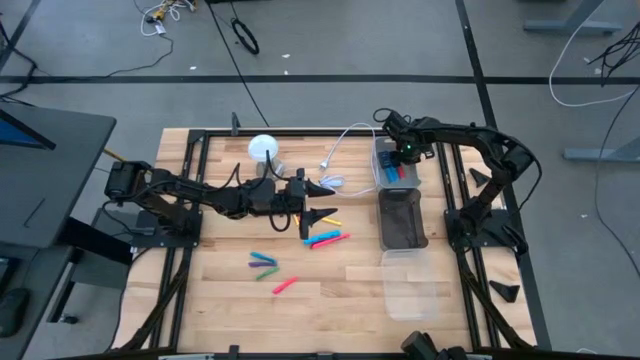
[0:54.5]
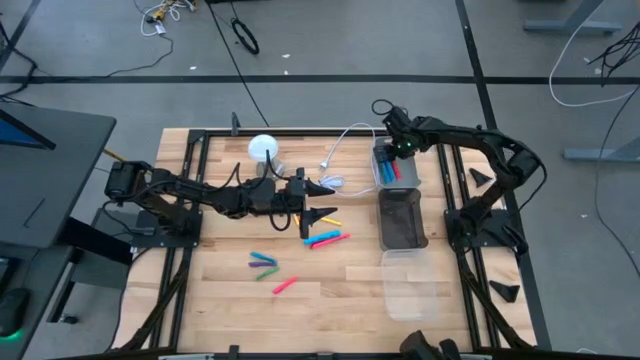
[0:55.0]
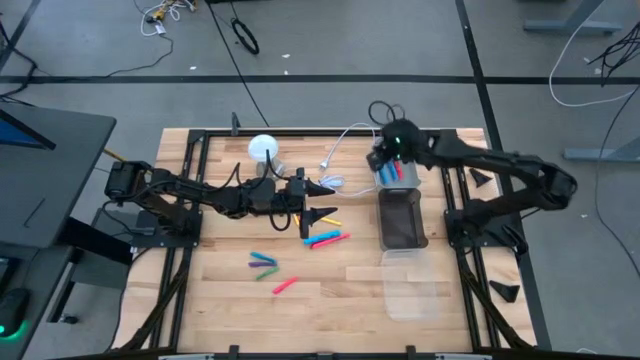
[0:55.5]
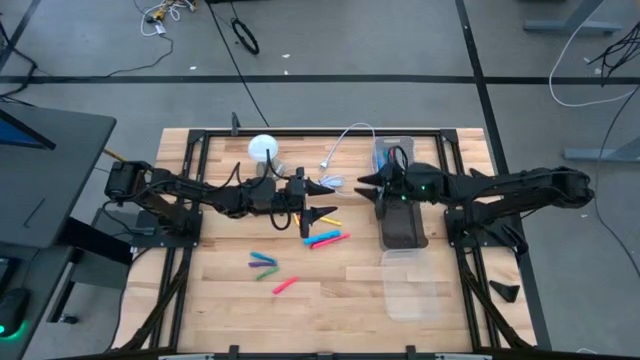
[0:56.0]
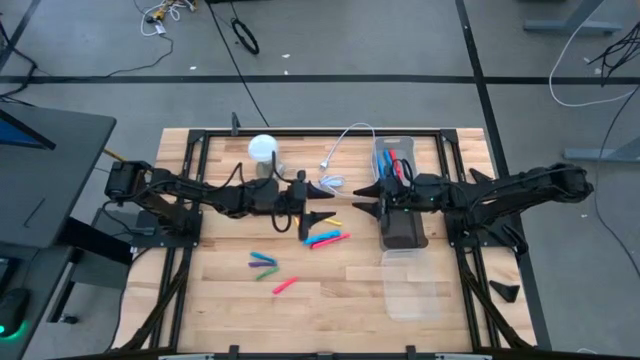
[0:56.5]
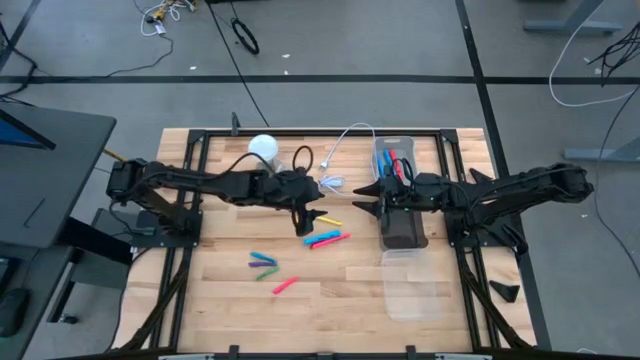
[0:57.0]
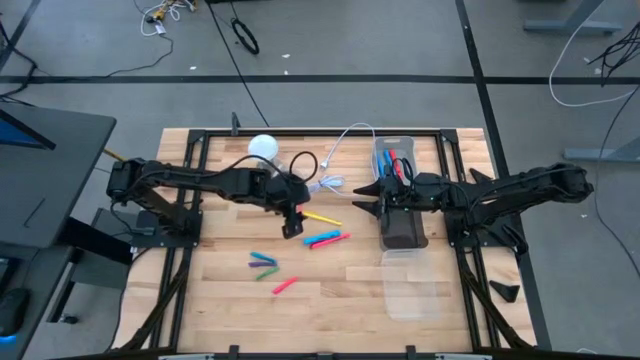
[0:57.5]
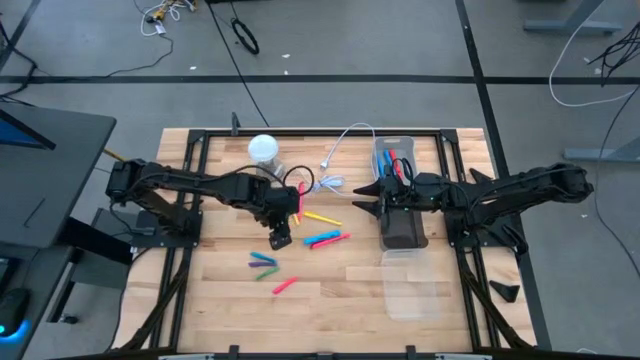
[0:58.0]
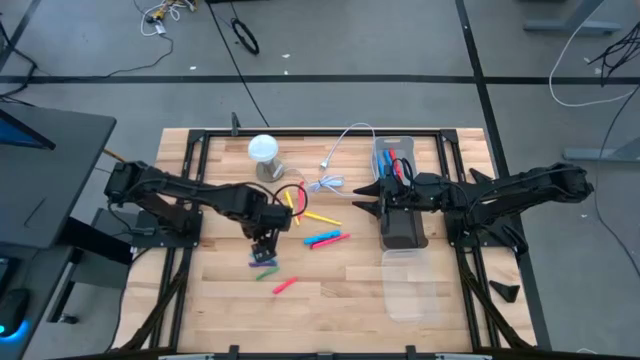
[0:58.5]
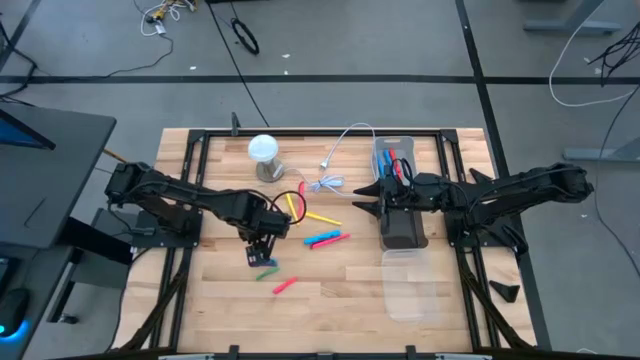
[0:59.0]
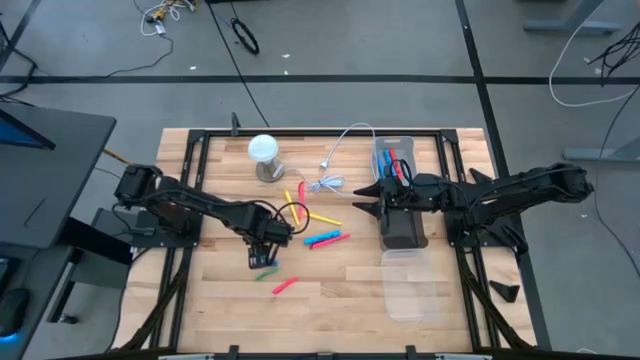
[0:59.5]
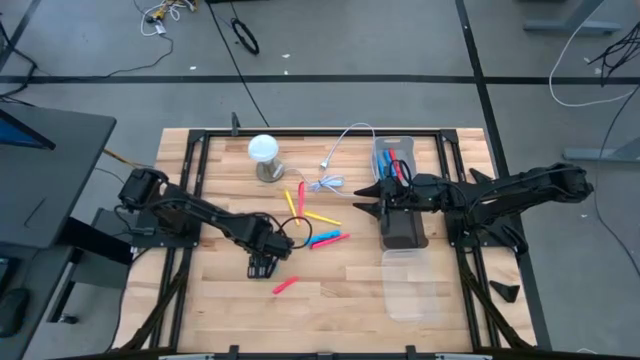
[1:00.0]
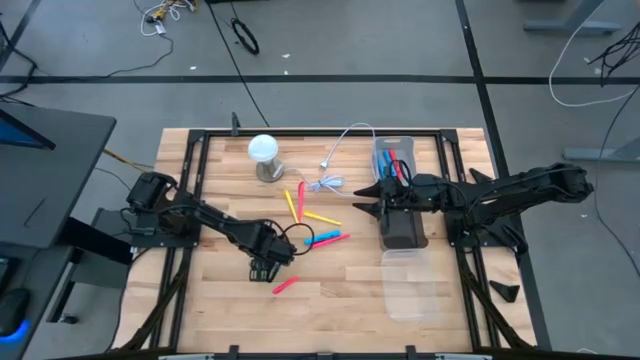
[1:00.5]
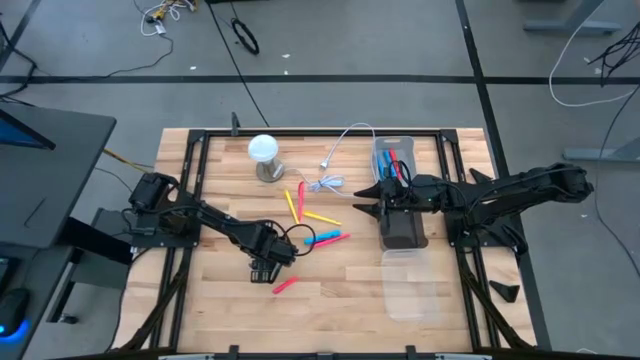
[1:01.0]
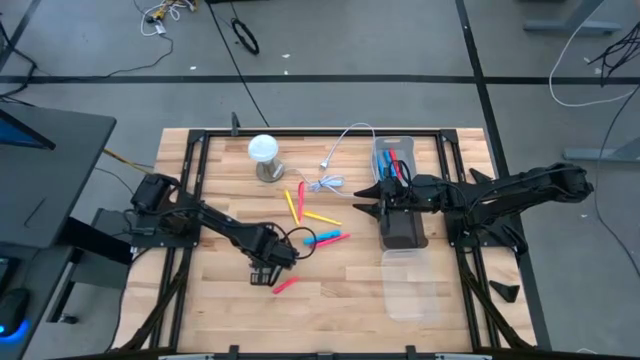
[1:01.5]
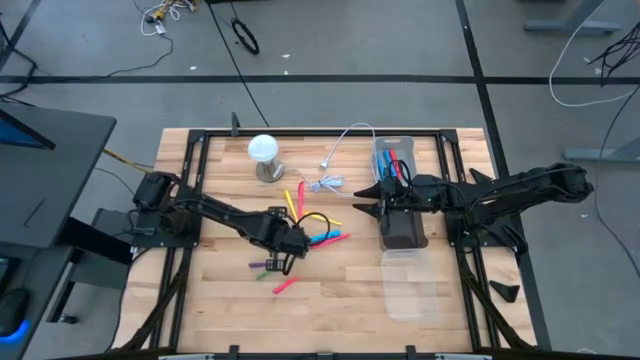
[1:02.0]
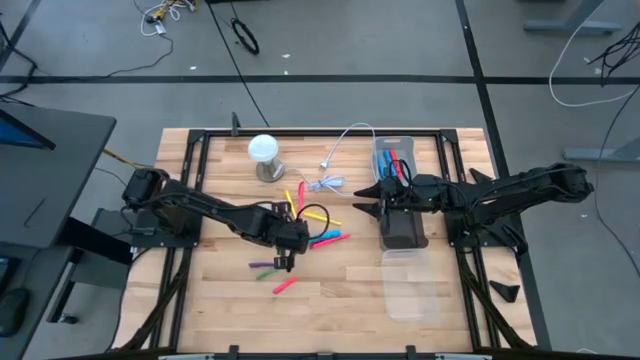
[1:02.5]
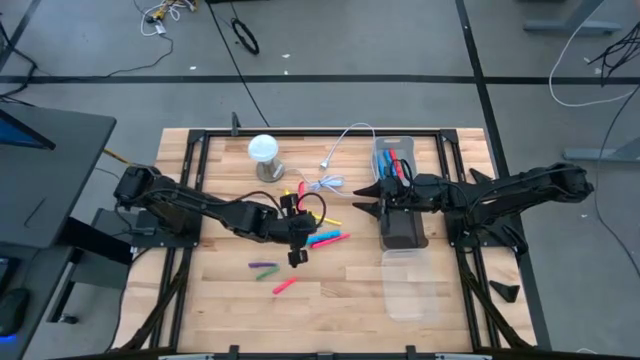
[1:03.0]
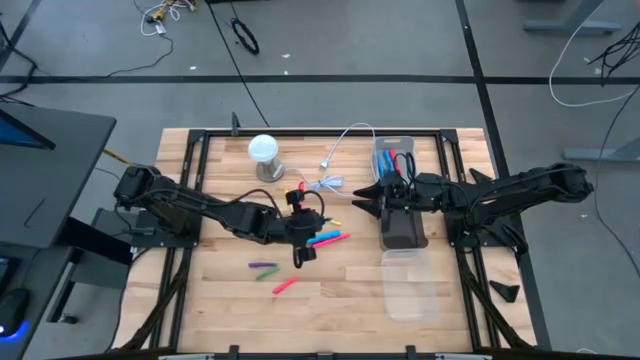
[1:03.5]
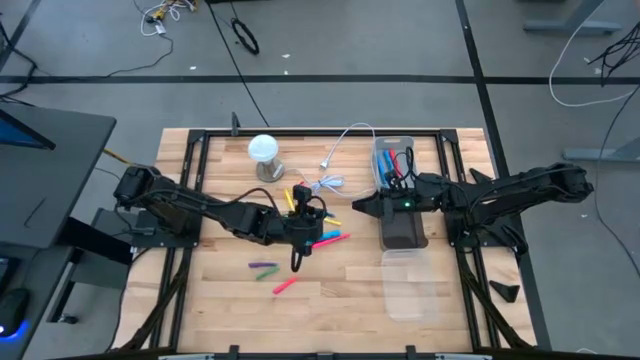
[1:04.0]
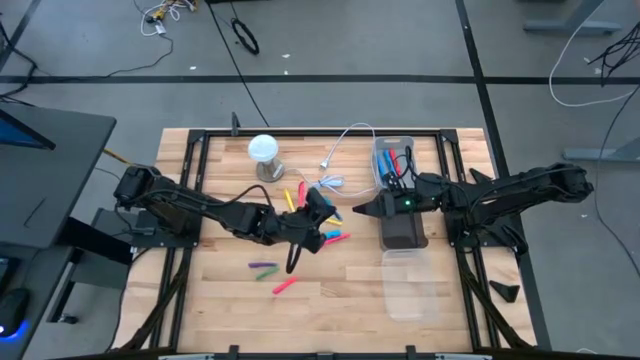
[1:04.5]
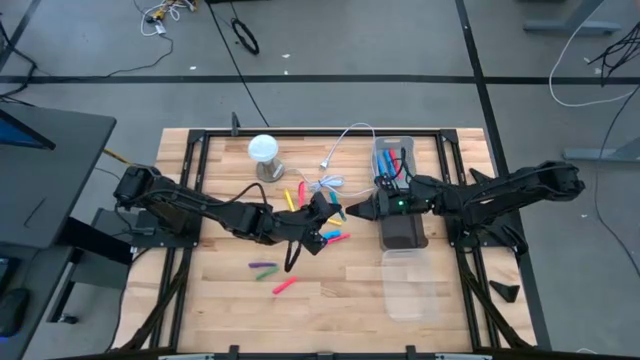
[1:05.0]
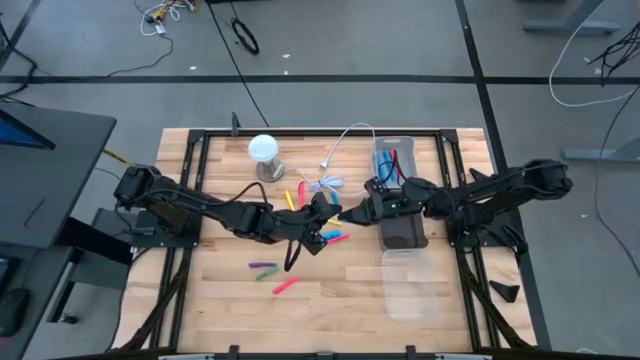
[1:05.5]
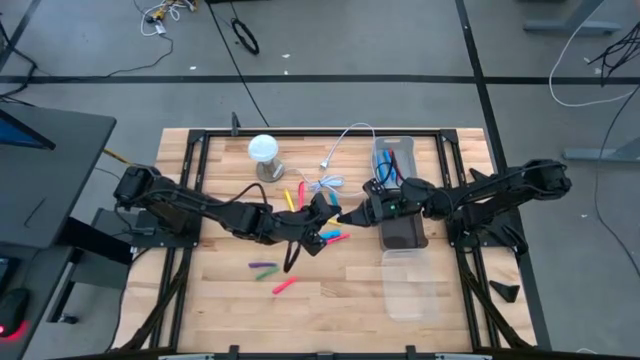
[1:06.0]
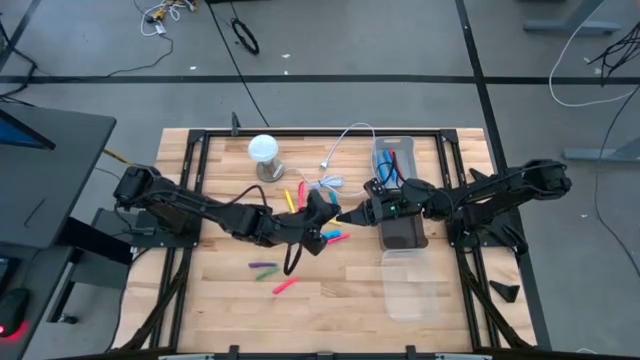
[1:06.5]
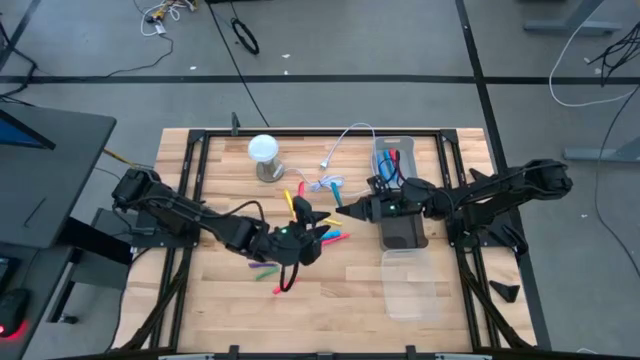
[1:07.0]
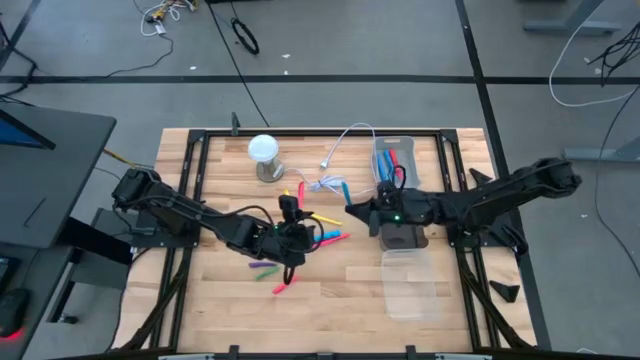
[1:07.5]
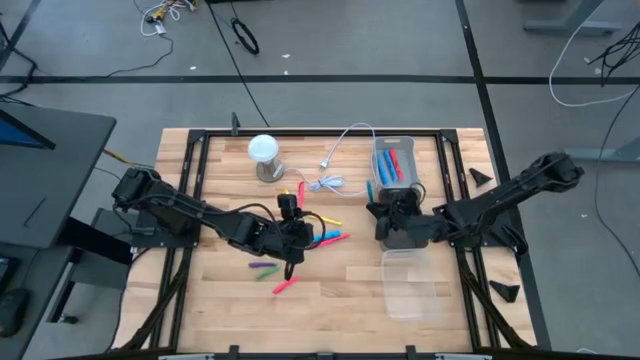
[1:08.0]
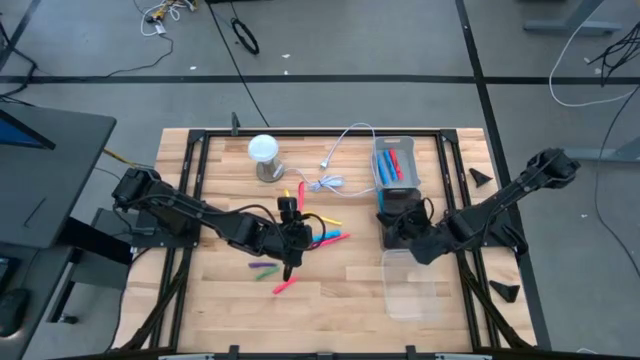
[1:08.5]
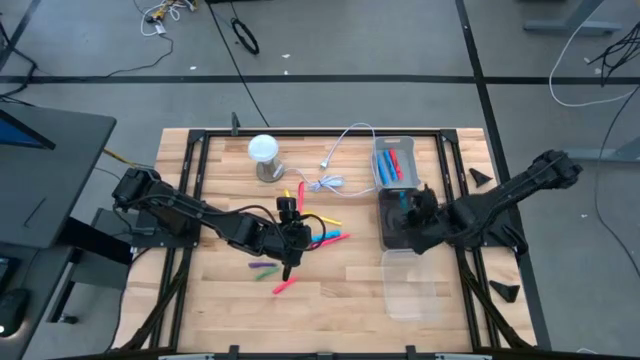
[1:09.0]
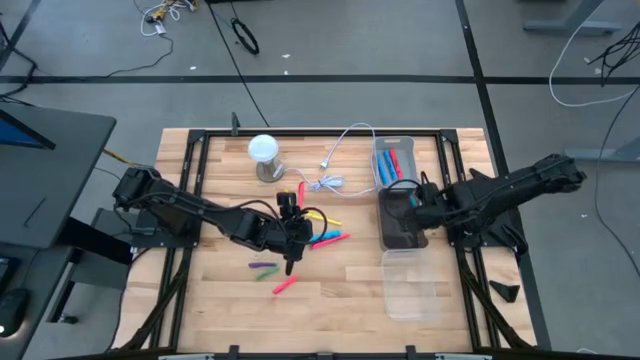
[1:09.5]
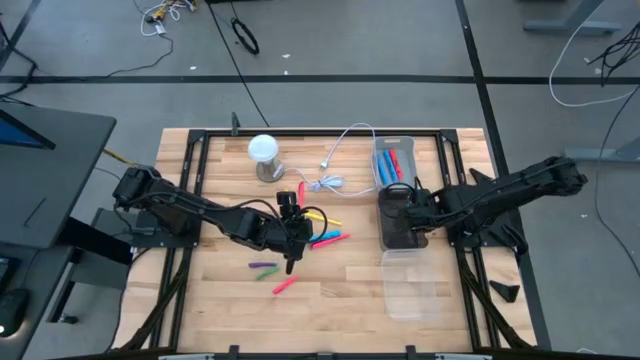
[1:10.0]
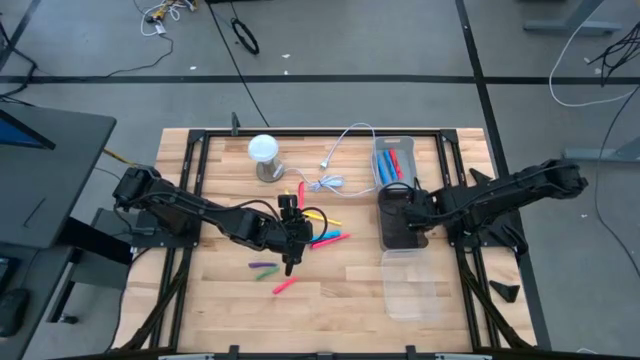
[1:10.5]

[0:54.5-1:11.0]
Task: Pick & Place Markers
Put the blue mini marker into the black bin
